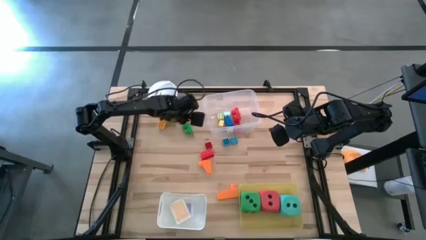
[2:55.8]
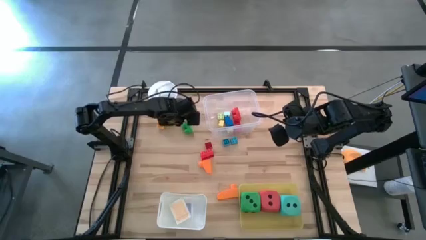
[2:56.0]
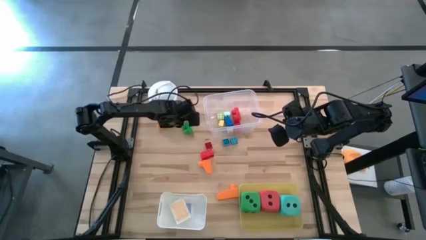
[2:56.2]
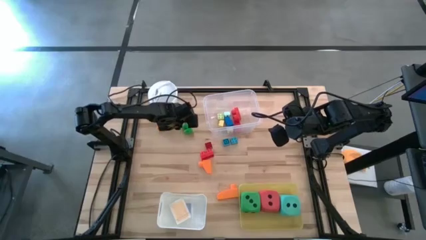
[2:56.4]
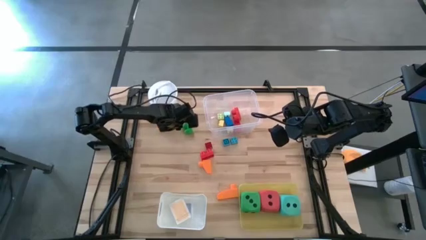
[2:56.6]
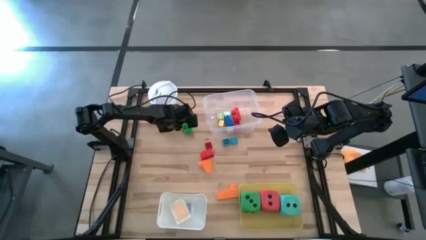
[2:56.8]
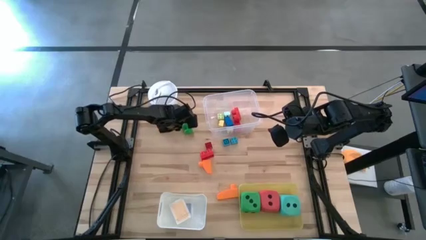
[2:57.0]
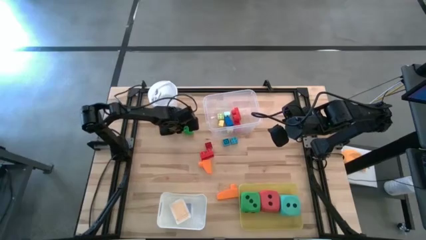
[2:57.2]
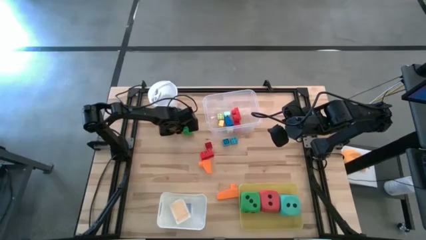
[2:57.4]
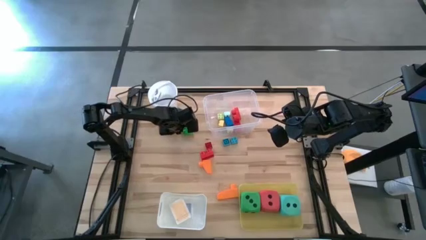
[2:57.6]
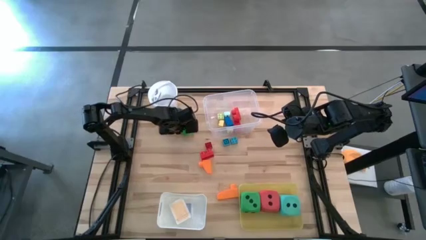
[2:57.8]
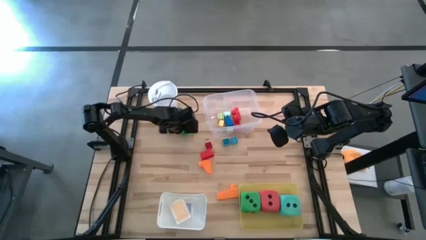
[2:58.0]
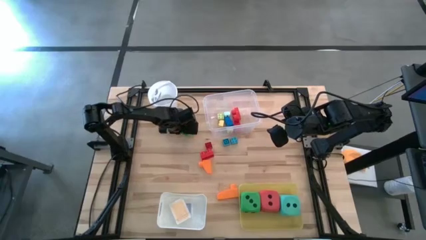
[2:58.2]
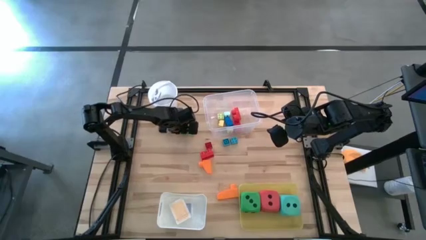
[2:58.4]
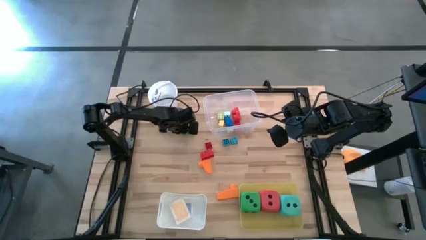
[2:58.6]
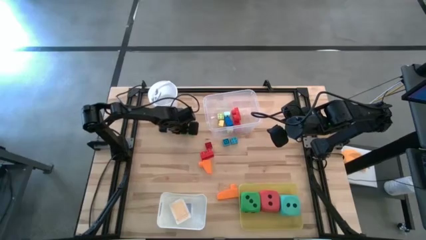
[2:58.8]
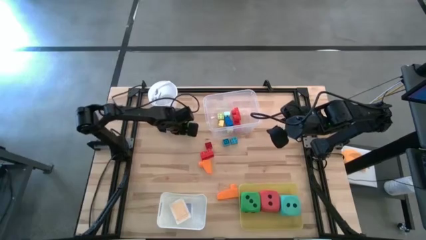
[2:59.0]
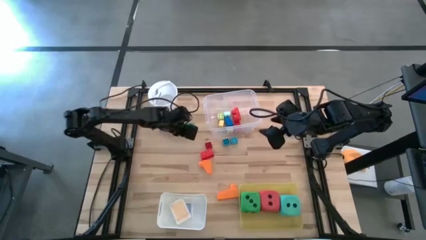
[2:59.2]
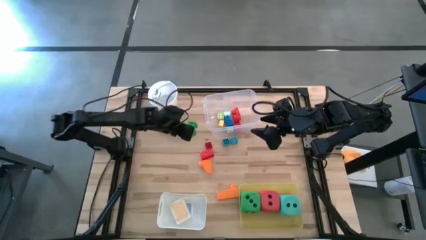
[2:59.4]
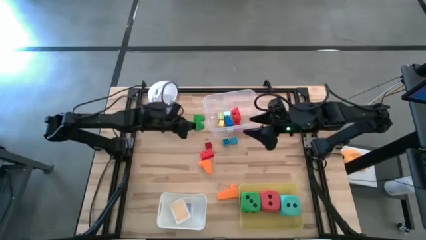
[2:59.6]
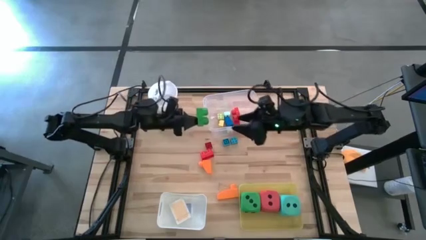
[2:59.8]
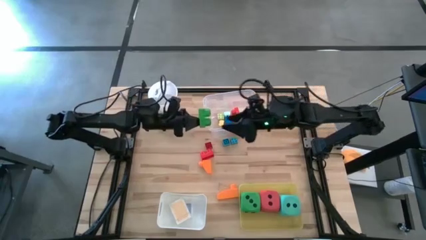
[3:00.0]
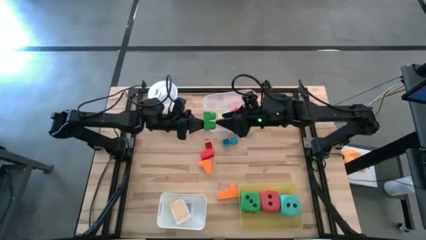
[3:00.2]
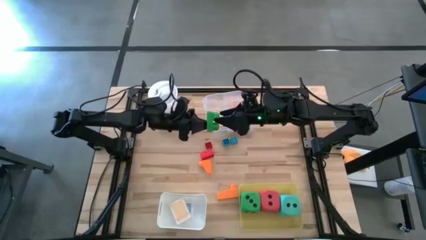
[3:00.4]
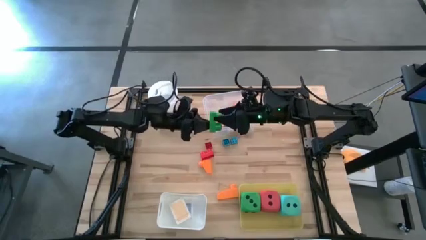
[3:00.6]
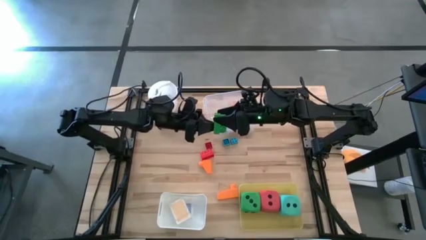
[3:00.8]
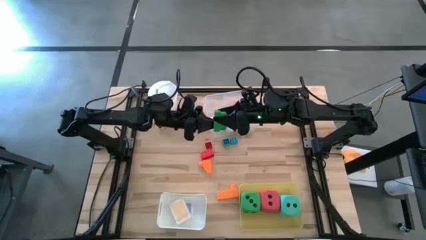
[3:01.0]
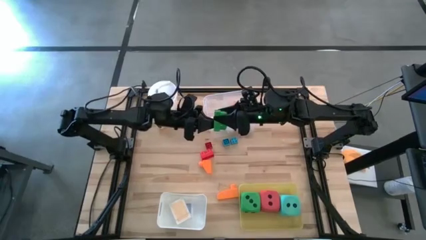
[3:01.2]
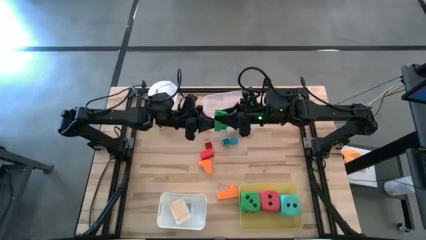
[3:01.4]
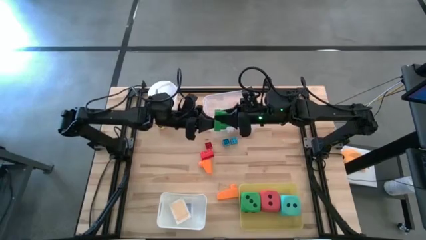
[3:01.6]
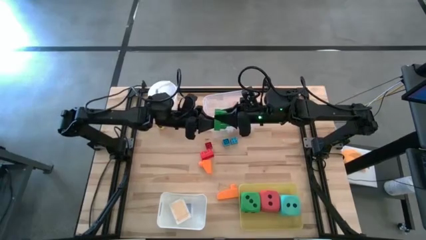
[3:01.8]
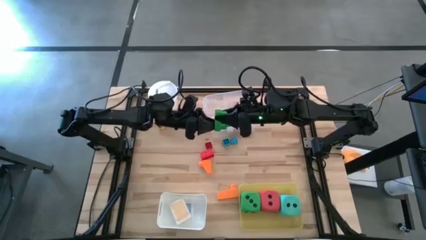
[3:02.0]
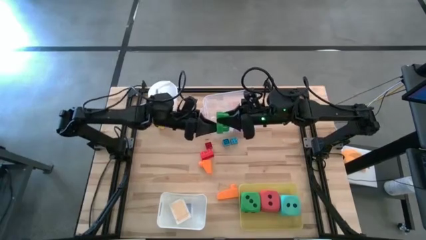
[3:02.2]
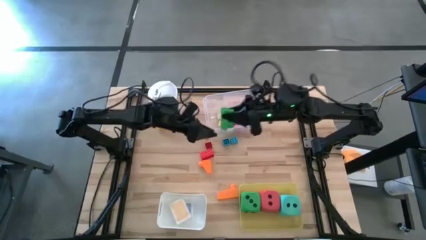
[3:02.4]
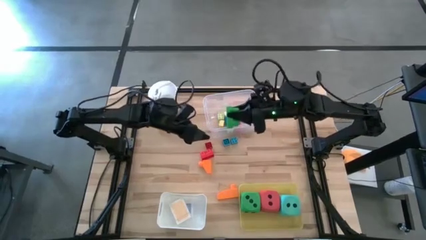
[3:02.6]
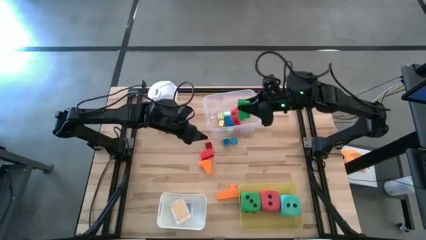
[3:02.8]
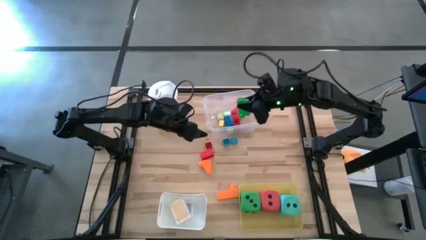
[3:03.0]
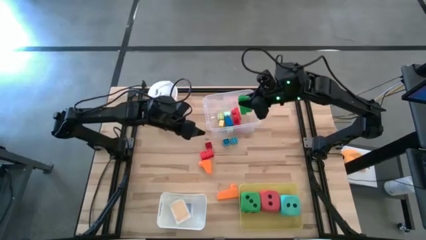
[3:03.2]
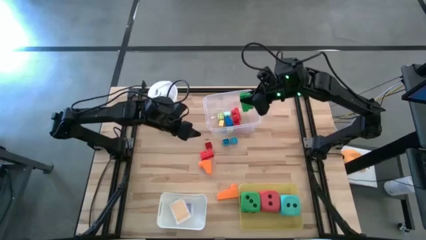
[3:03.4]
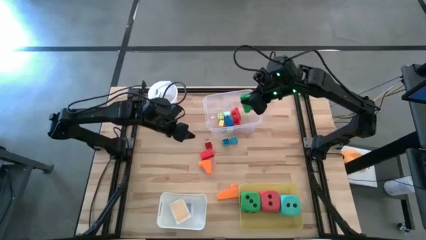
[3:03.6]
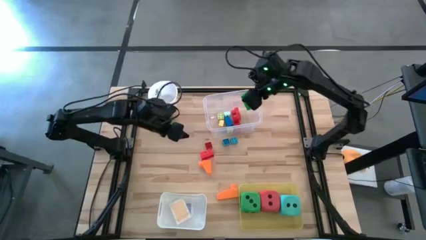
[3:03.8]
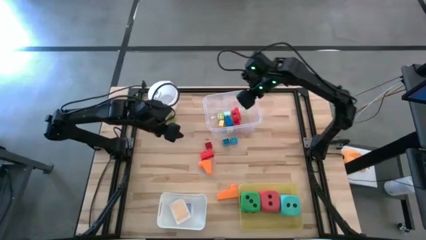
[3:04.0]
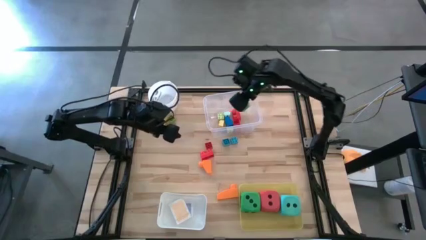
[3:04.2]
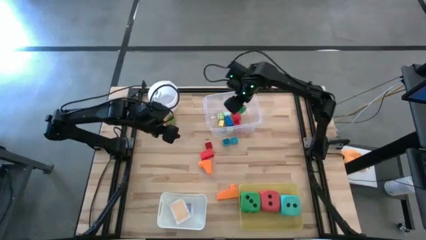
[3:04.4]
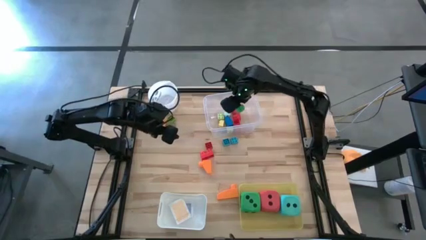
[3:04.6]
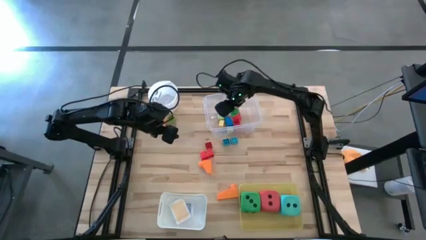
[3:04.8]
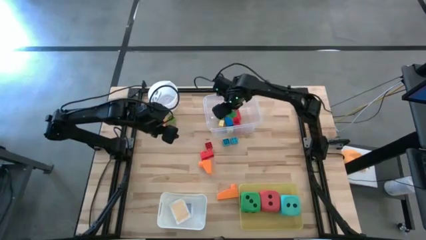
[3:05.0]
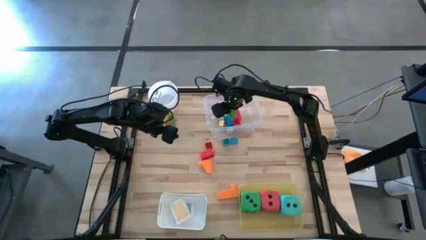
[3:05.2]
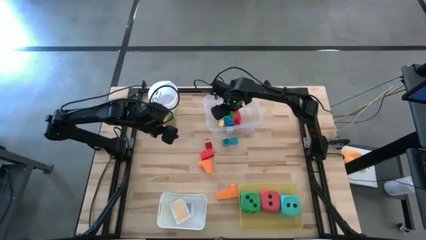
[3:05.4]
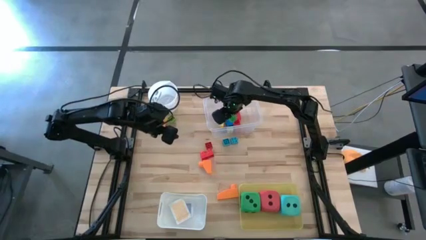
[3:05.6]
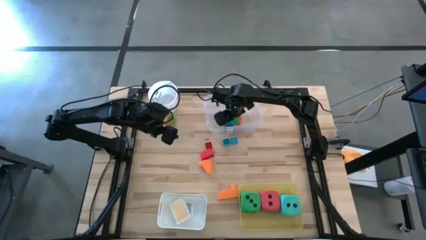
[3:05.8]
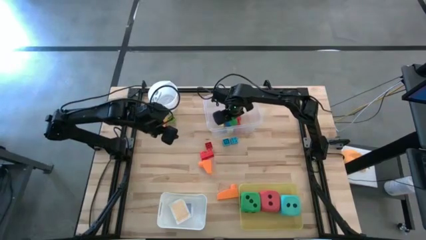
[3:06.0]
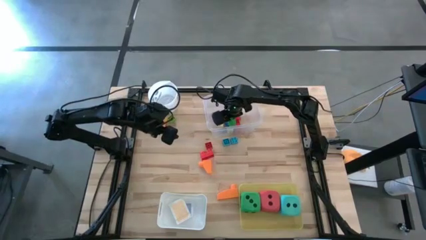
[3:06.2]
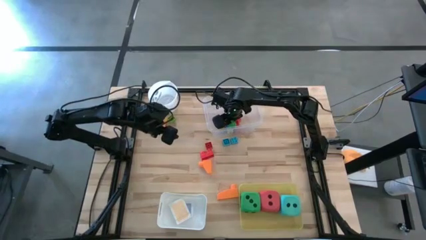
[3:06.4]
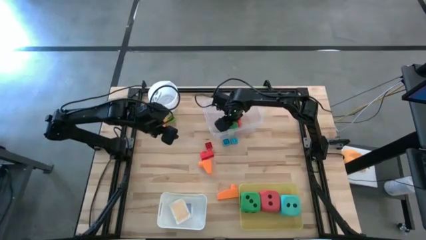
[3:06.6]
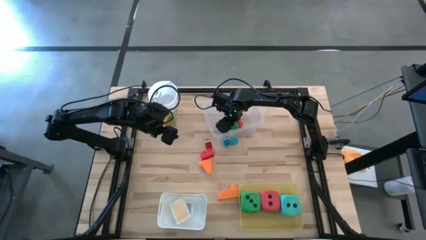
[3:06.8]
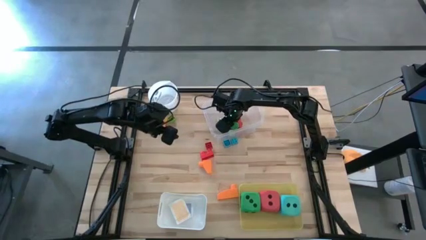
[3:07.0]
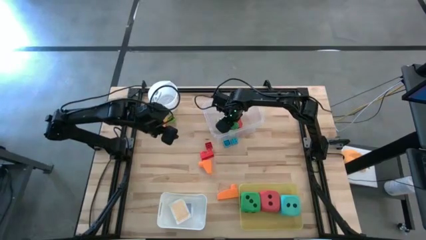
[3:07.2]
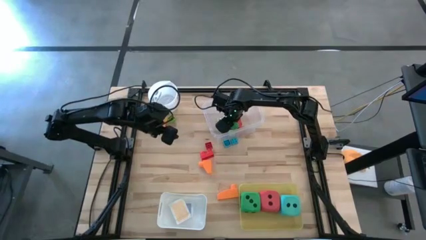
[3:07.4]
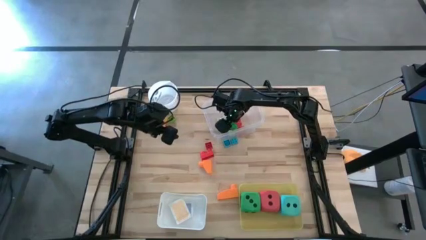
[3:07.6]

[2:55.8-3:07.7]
Task: Pick & Place Toys
Put the green game piece into the transparent bin

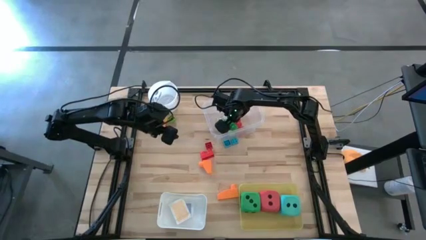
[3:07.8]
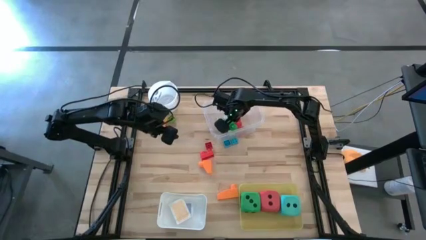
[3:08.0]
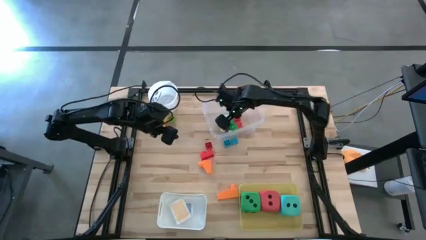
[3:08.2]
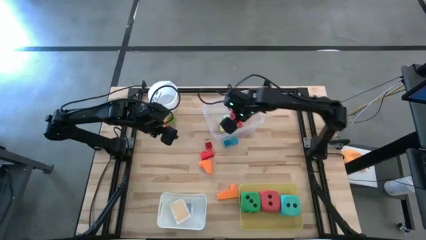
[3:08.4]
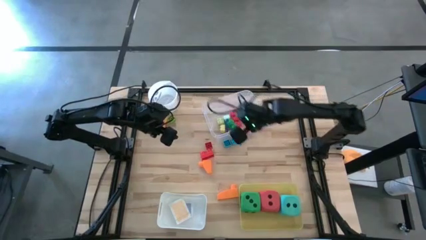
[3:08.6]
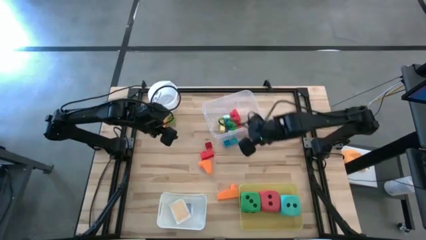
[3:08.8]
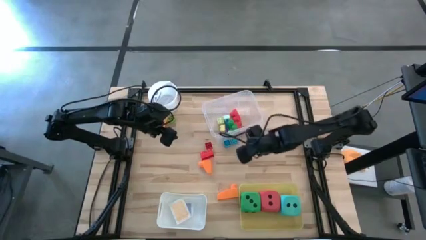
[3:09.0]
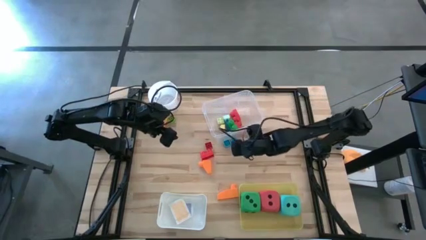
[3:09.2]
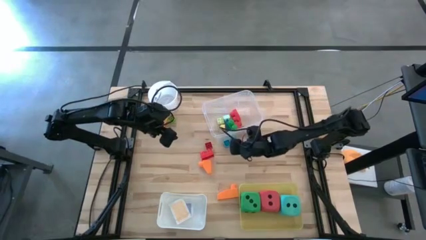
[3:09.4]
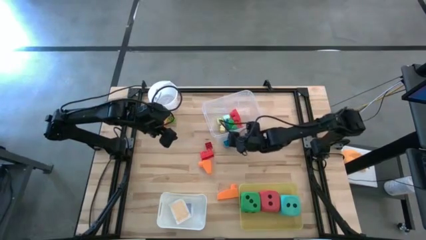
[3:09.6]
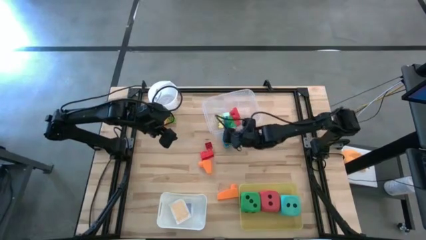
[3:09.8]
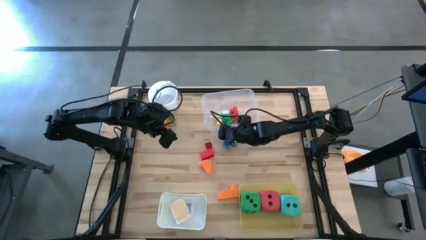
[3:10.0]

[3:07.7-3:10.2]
Adjust the transparent bin on the table

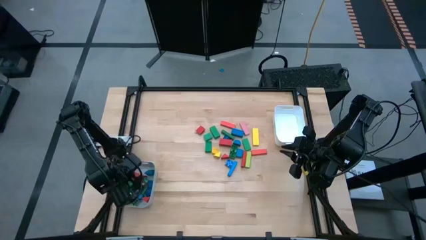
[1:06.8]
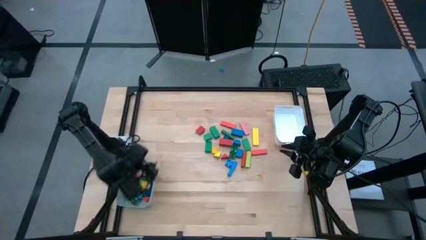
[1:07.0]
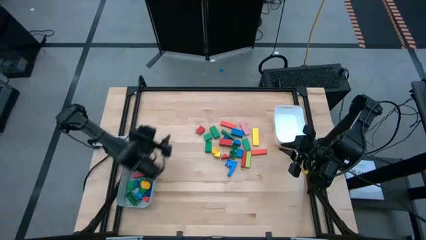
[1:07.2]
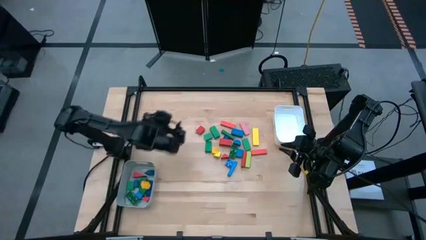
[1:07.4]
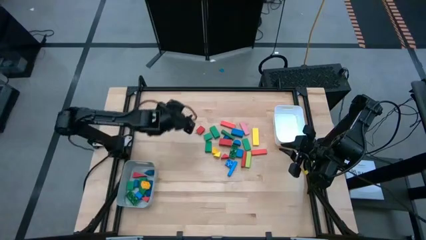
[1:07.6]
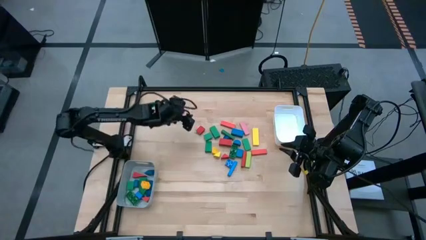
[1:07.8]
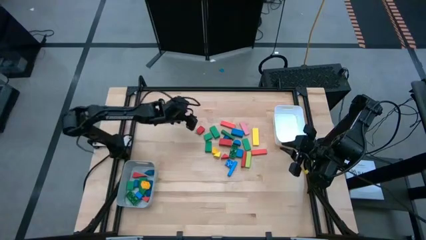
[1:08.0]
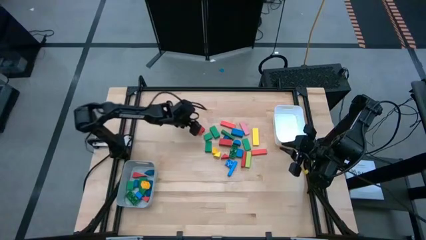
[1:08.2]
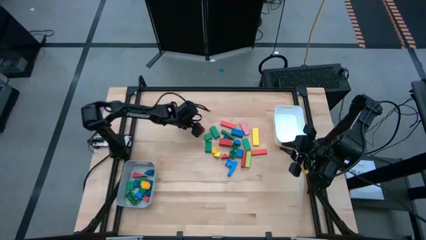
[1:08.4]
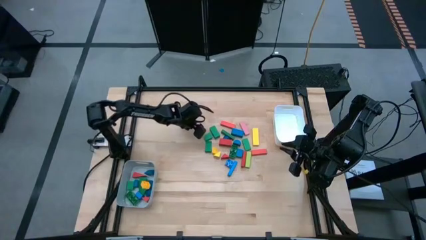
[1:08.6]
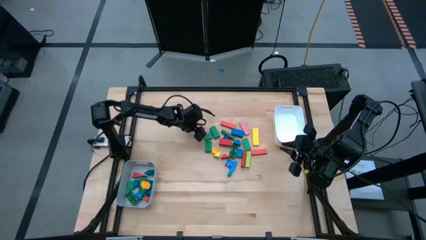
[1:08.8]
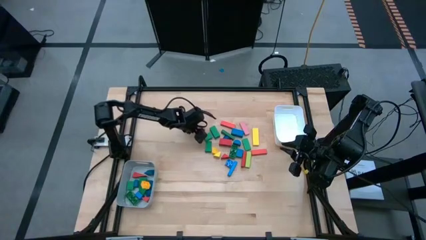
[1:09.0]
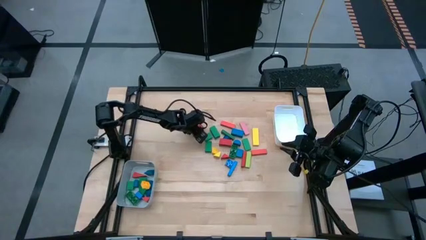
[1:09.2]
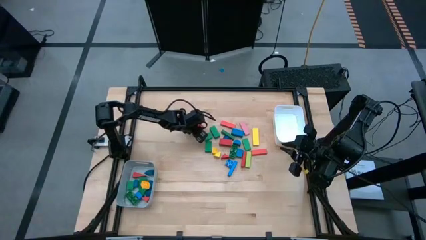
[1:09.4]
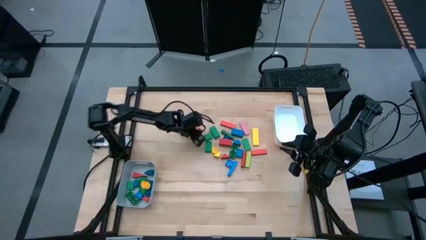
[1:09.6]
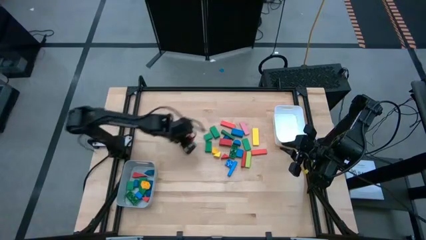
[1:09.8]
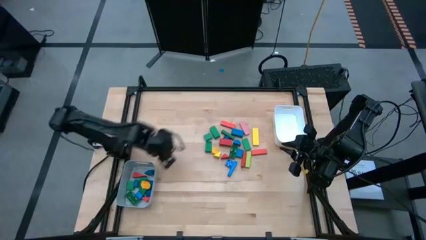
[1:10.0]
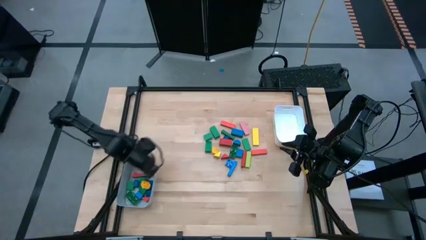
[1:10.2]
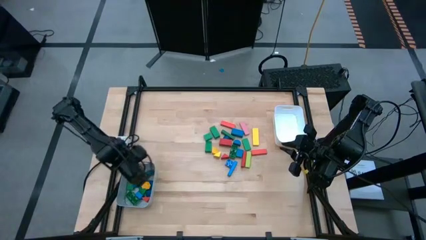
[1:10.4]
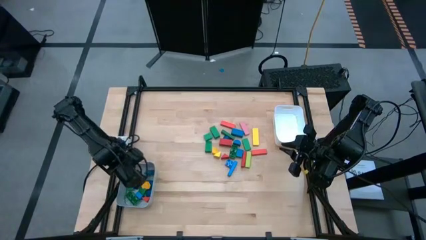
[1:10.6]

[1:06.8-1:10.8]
Task: Sort blocks by size
Put the red triangle block into the gray bin
